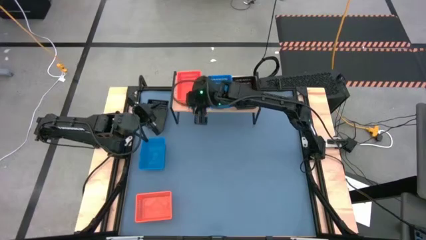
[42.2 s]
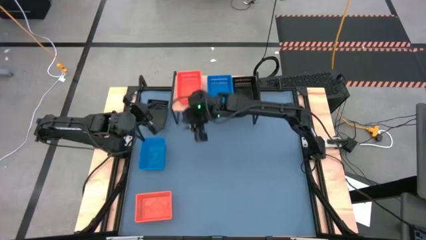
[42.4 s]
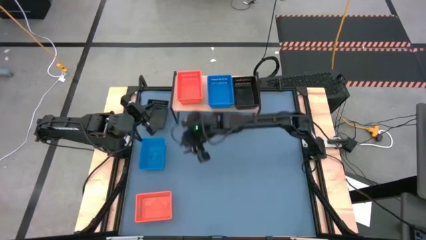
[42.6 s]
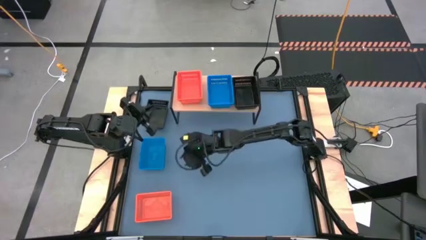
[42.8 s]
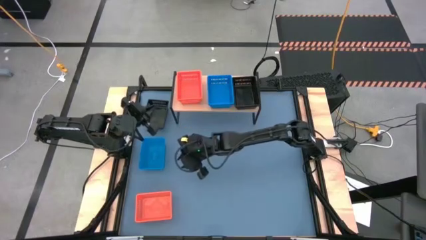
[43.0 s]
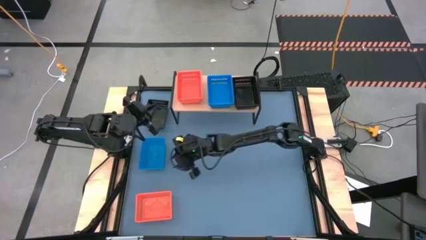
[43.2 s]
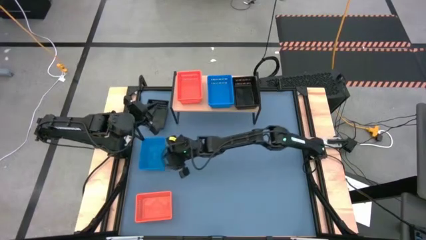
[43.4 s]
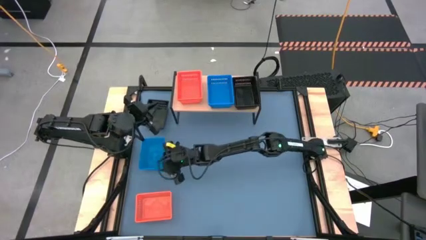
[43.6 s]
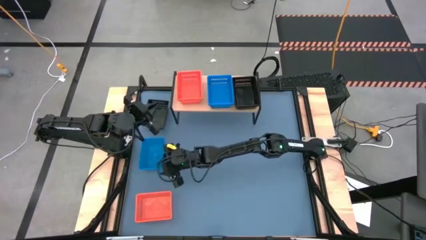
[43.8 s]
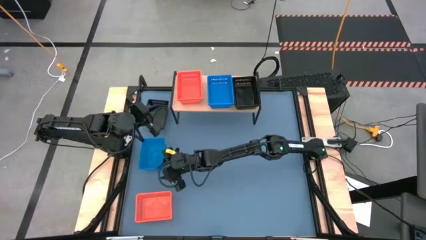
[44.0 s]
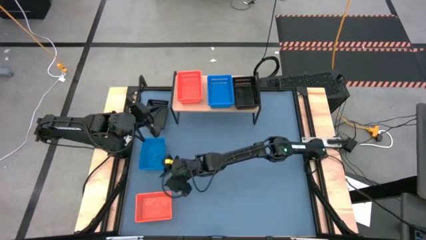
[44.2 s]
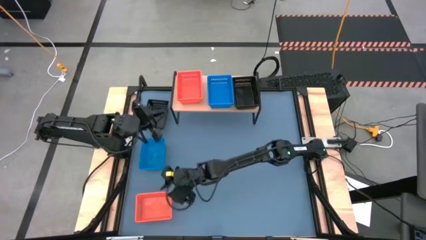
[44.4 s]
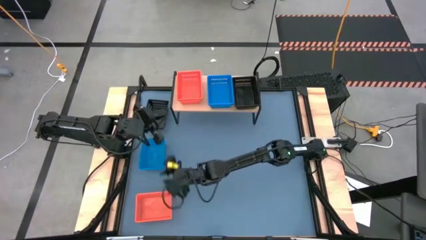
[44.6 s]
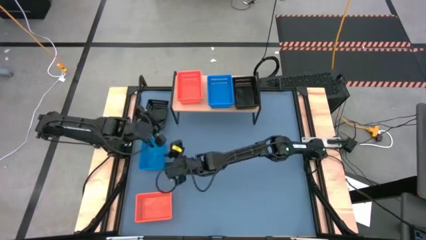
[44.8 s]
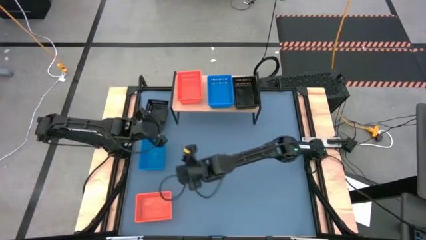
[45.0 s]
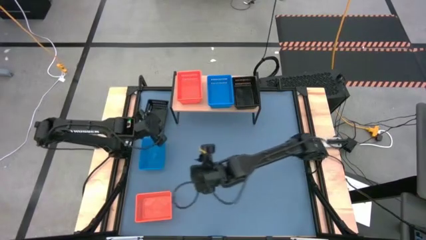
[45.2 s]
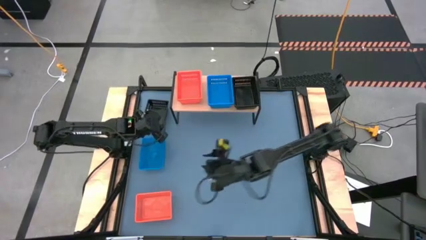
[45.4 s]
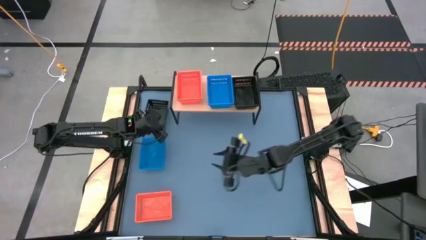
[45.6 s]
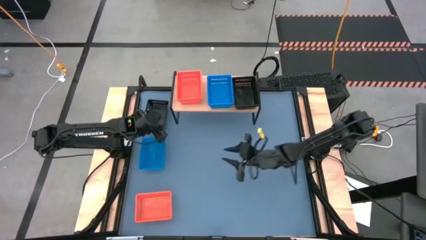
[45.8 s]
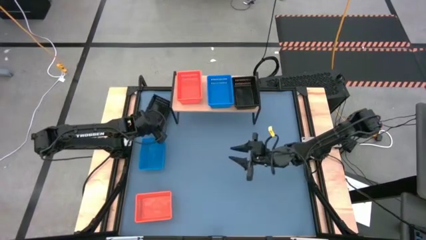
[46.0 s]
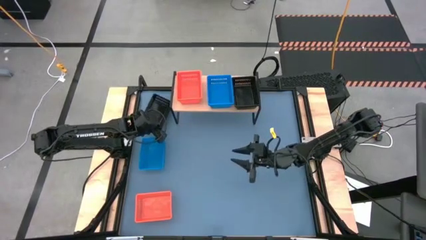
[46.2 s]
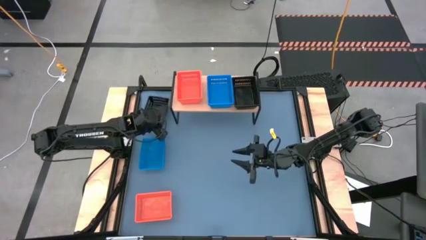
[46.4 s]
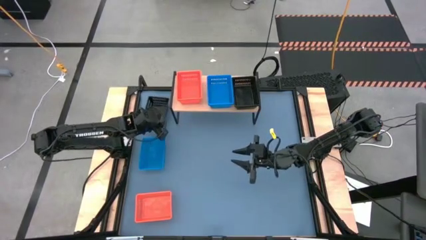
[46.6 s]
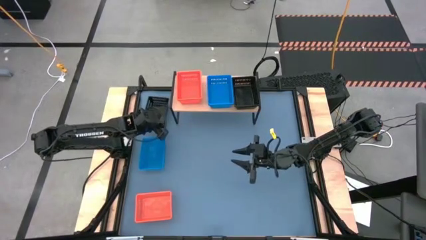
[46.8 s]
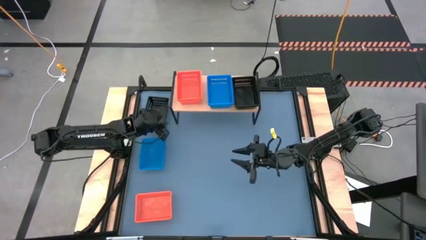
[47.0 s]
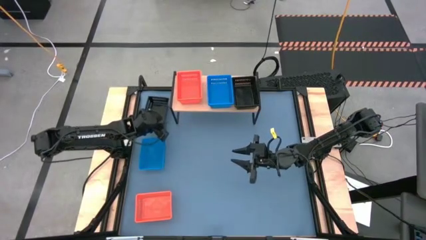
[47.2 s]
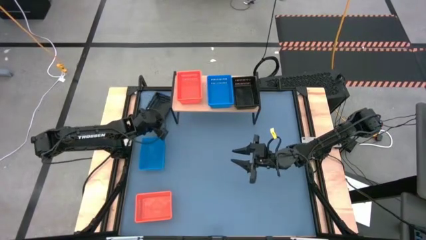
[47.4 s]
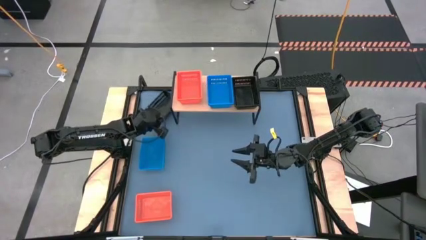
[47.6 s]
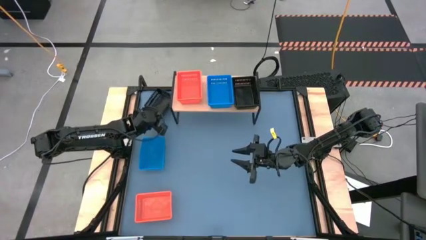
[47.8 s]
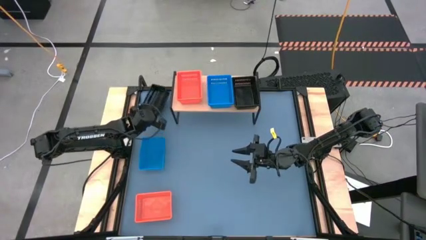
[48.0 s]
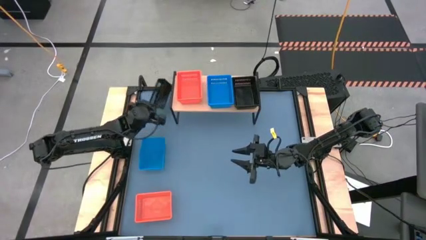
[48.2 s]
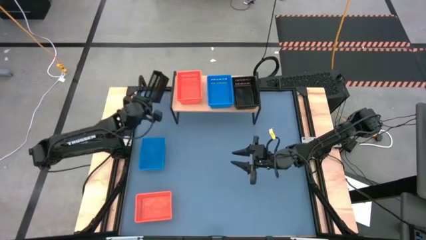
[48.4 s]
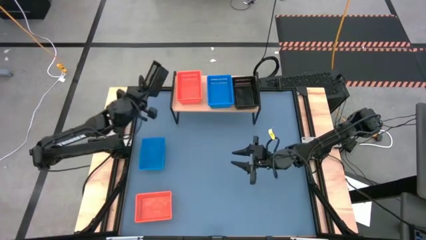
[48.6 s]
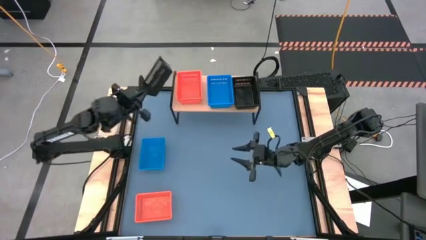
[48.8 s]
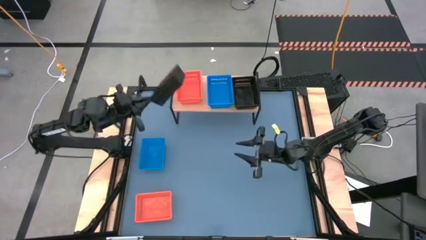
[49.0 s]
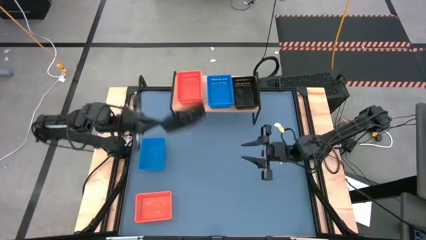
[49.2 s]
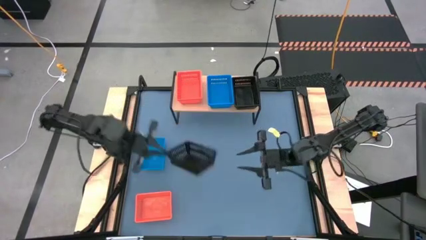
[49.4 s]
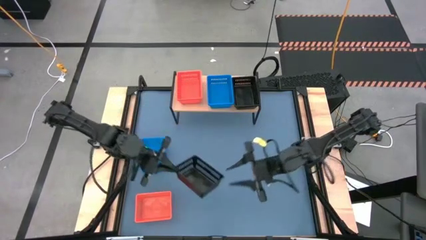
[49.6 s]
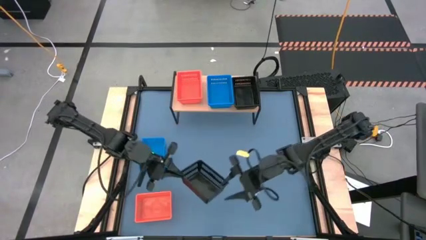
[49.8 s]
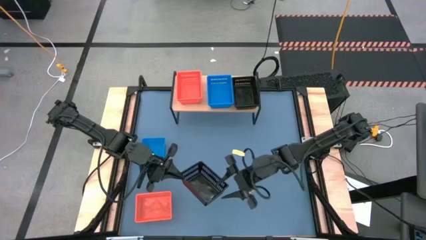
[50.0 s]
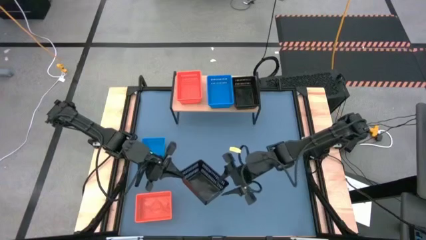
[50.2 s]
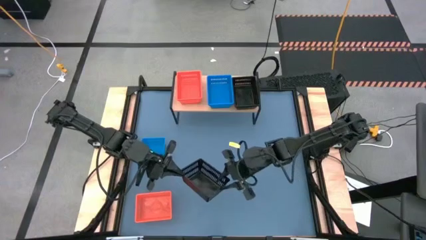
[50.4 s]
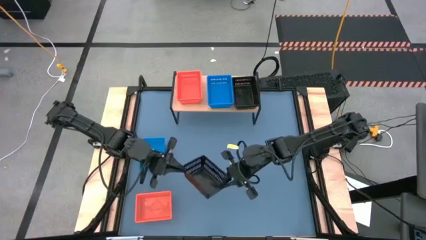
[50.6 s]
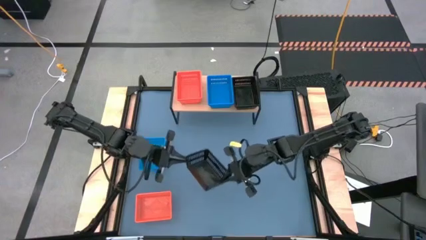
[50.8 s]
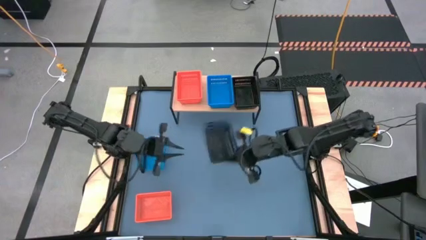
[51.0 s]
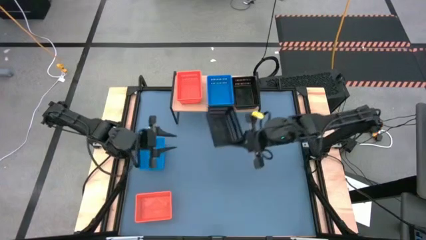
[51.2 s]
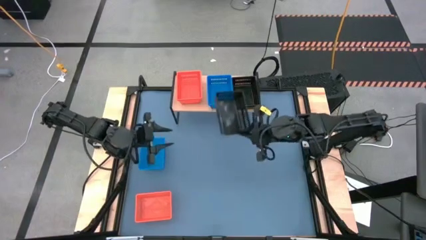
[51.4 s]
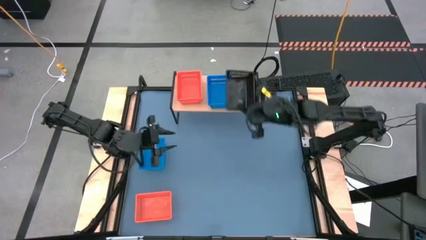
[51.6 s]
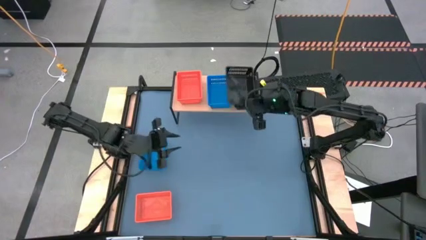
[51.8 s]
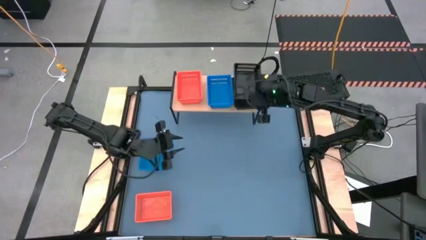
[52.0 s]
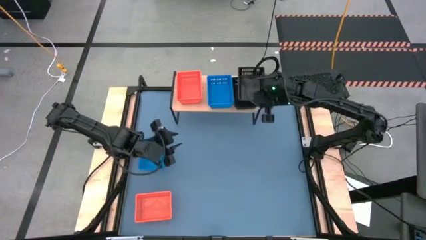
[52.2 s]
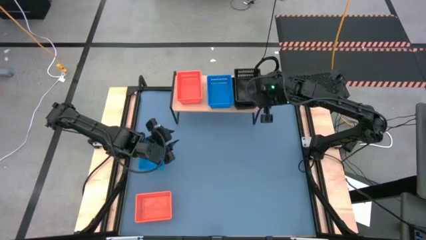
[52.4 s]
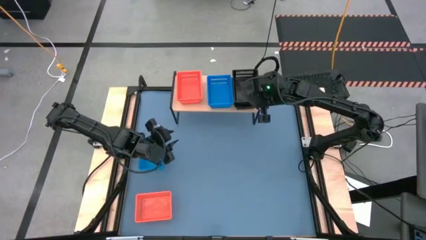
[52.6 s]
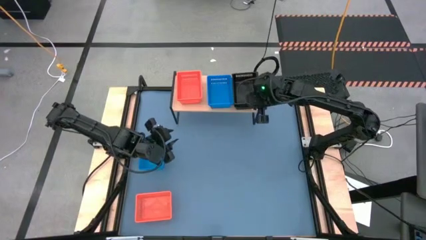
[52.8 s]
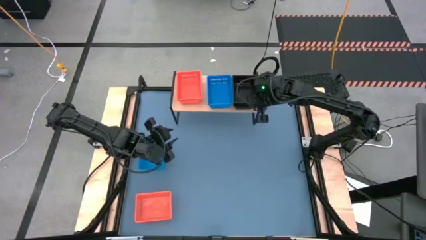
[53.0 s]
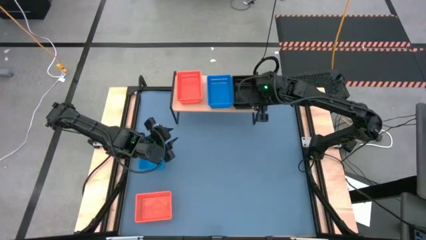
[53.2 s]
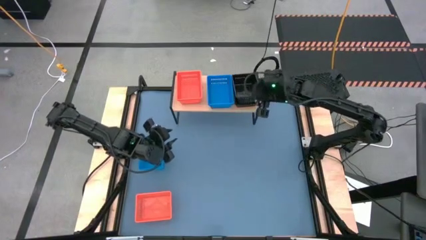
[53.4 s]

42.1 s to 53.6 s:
Task: Stack baskets on shelf by color
Stack the black basket on top of the black basket on the shelf
